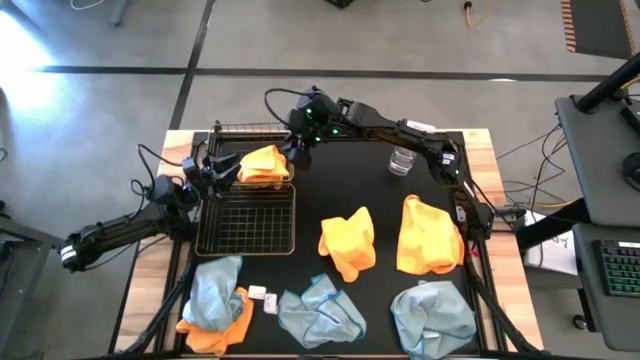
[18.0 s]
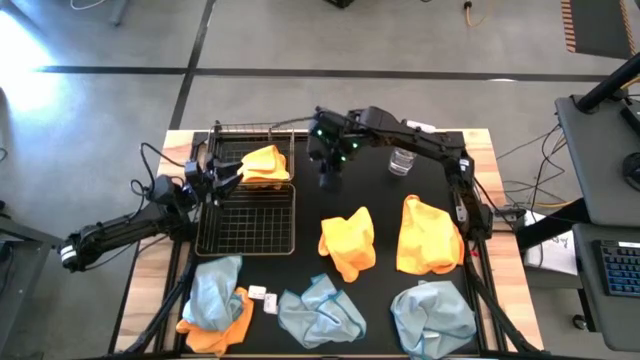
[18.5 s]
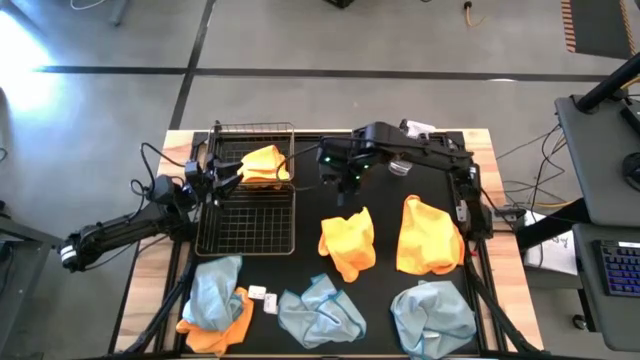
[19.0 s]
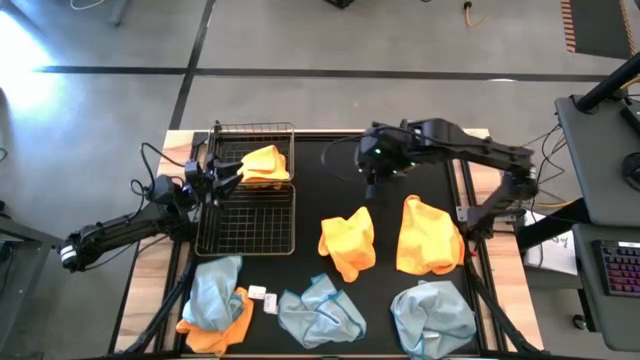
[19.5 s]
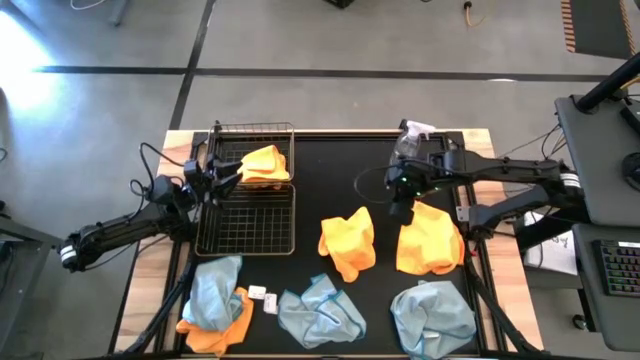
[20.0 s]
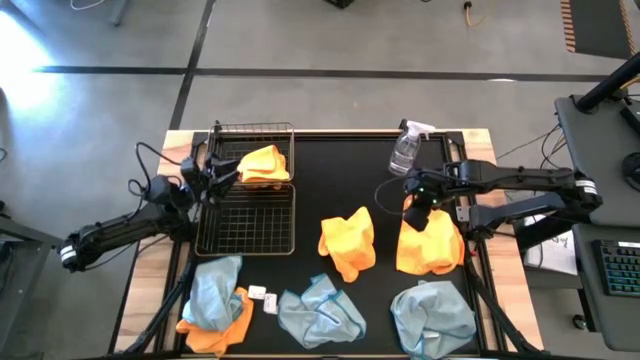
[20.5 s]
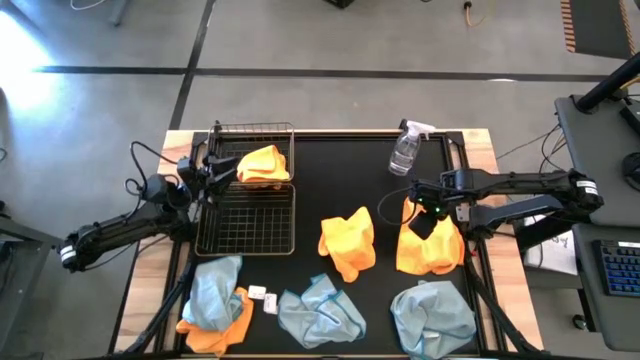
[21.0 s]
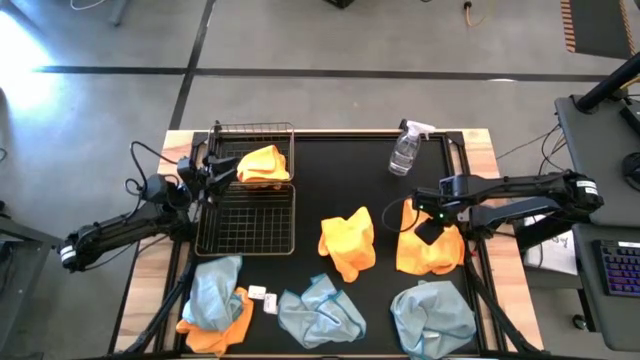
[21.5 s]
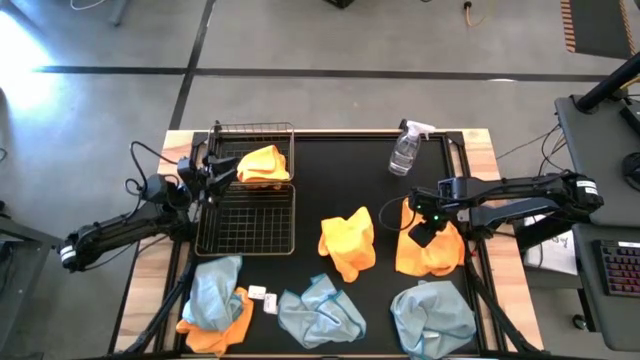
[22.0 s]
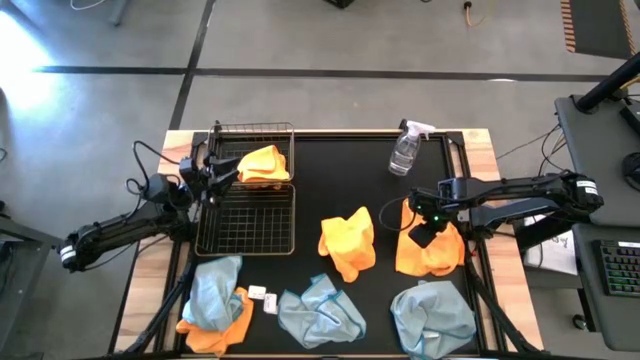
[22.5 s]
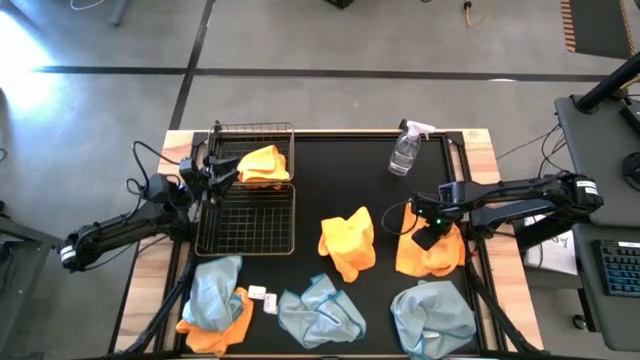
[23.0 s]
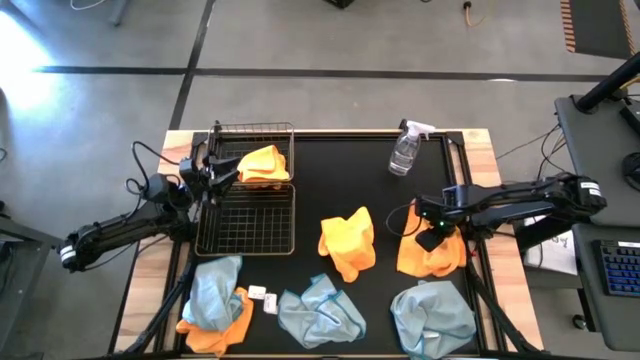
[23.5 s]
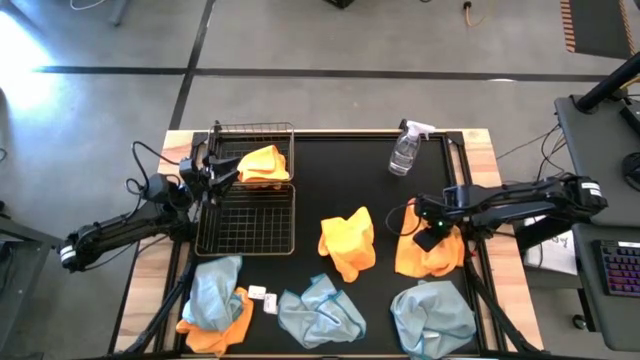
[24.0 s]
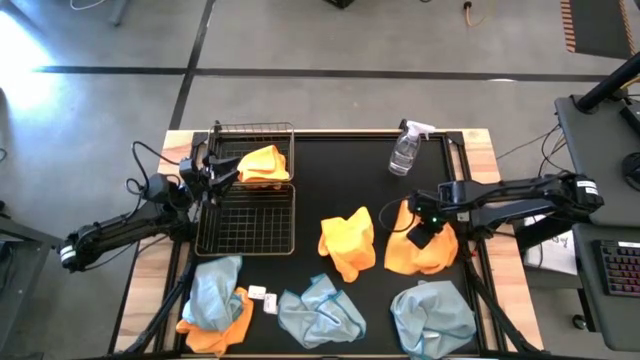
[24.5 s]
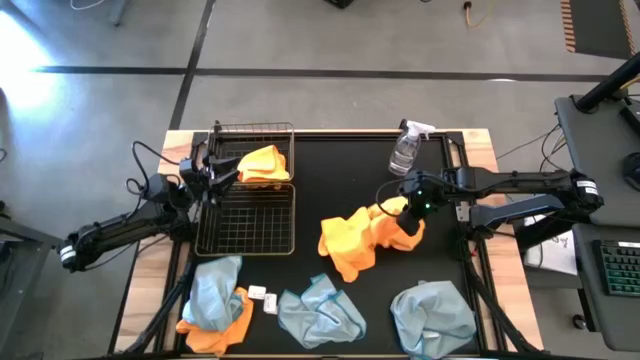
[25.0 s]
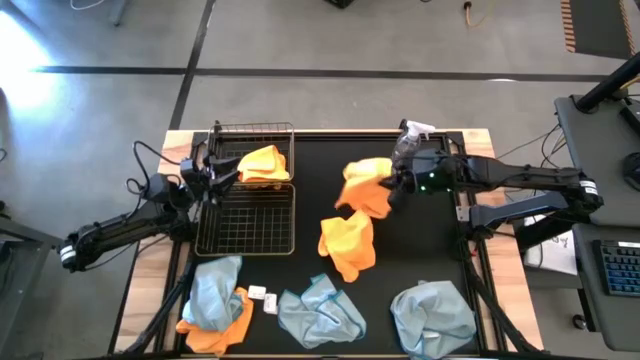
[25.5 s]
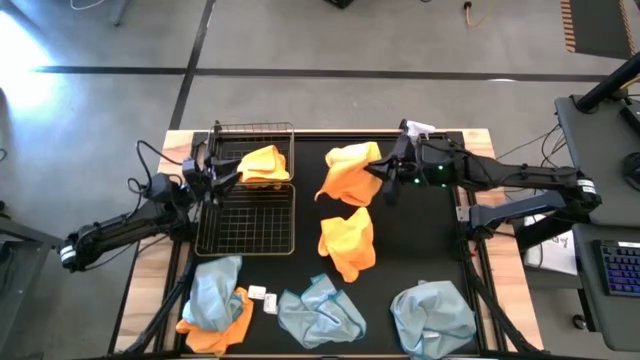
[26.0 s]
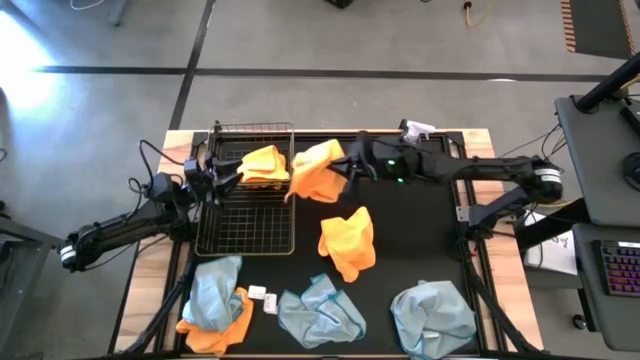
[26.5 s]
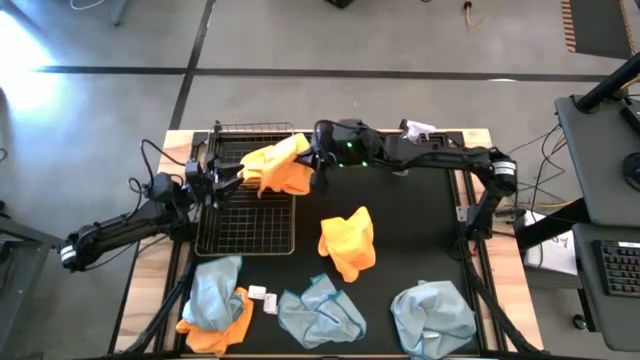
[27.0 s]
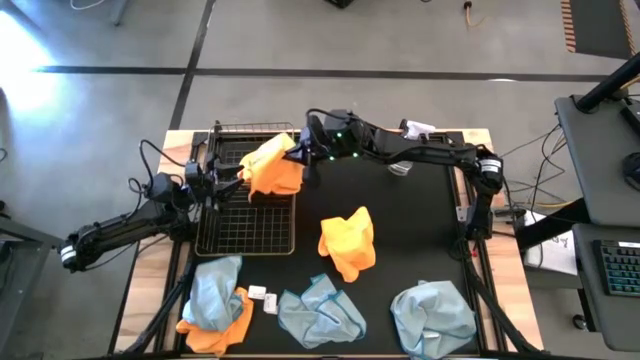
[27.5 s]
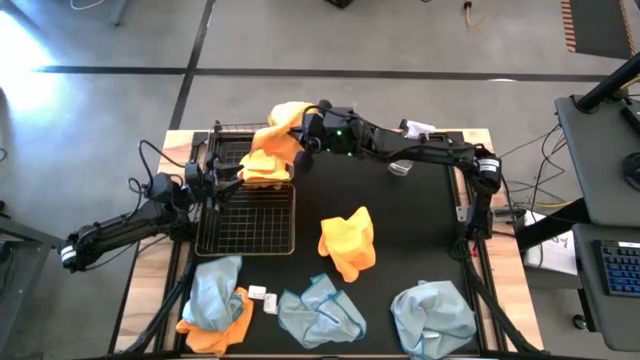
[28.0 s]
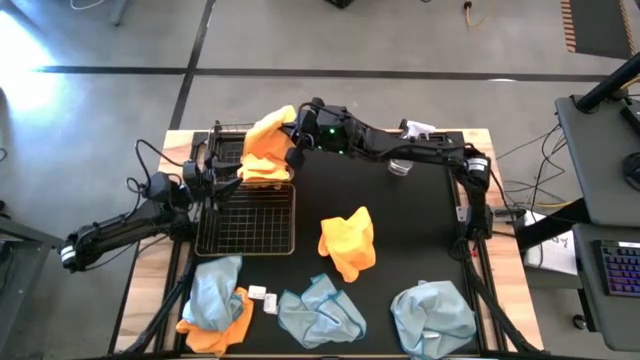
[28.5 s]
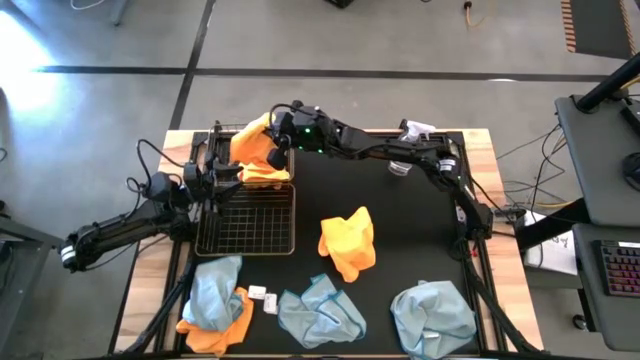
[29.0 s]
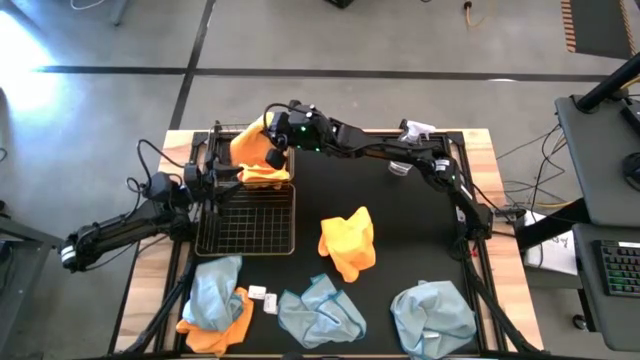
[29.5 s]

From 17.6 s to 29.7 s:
Task: Sort microfiber towel by color & place in baskets
Put the top right orange microfiber towel into the top wire basket

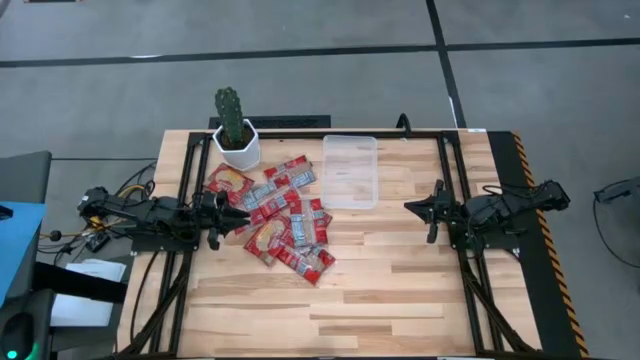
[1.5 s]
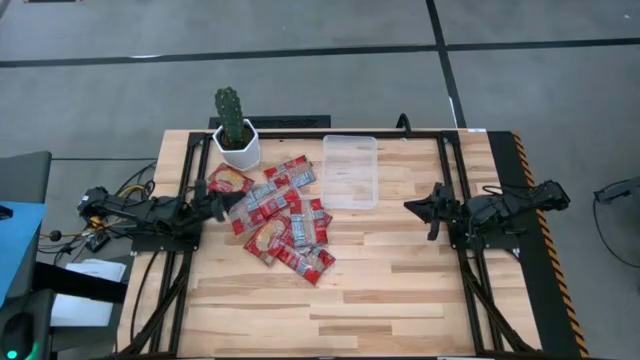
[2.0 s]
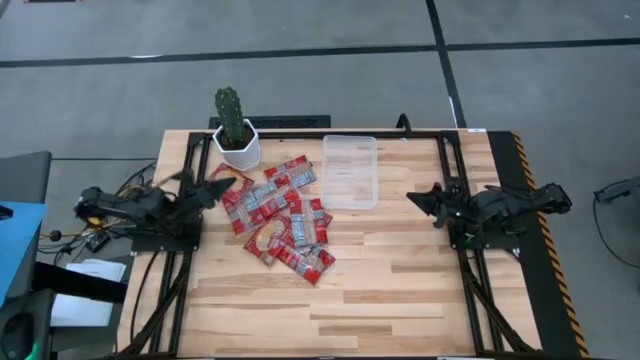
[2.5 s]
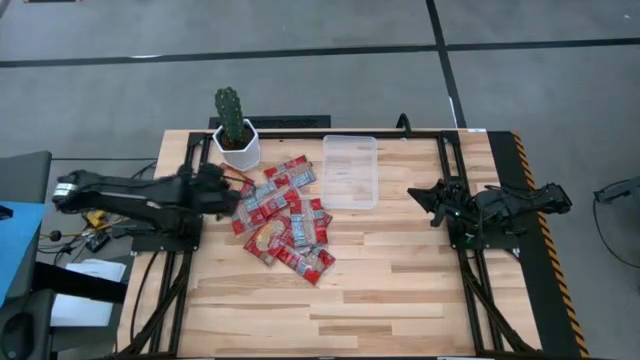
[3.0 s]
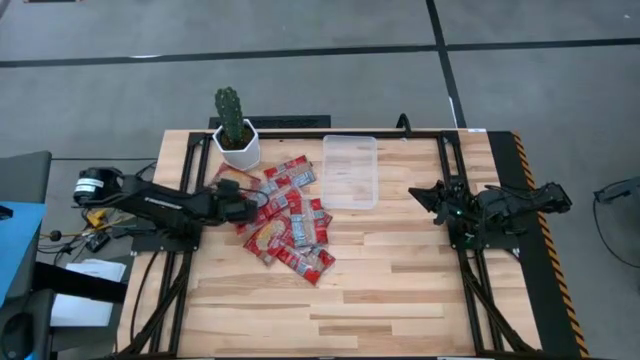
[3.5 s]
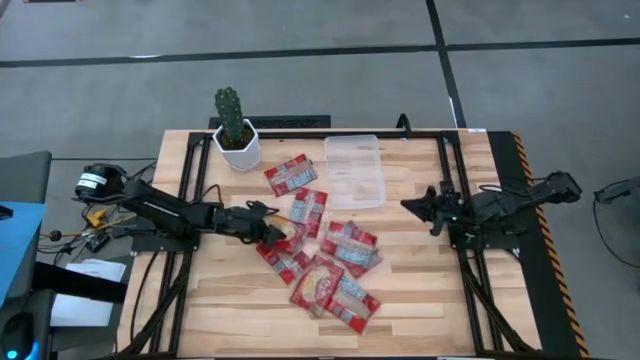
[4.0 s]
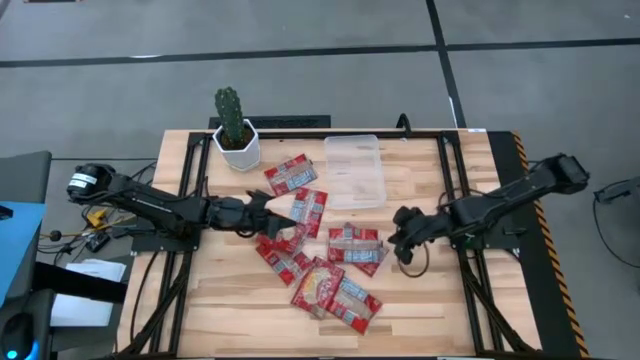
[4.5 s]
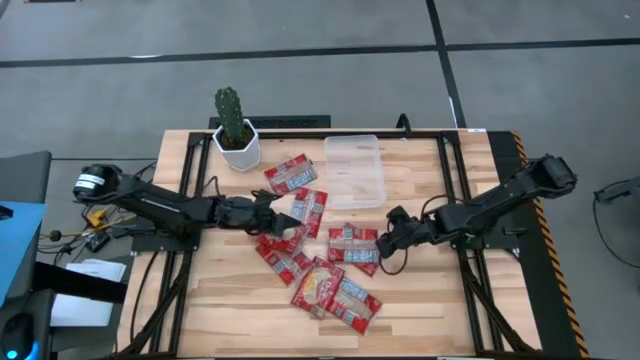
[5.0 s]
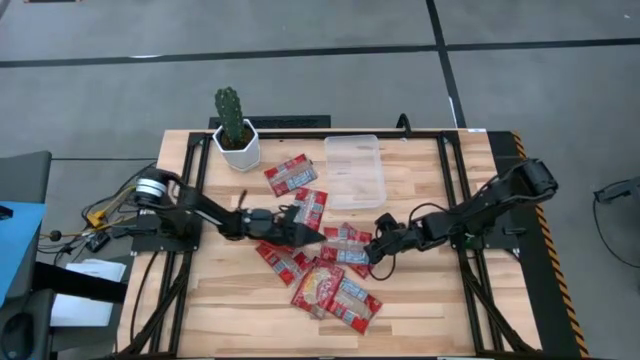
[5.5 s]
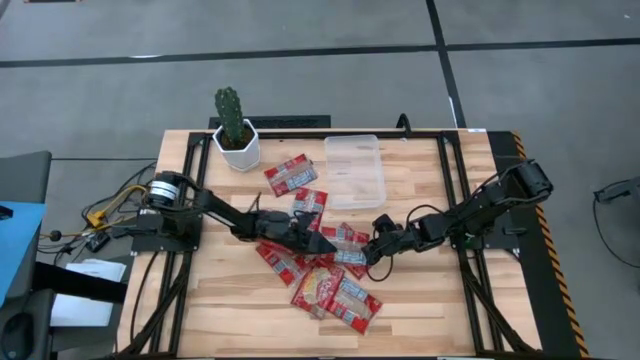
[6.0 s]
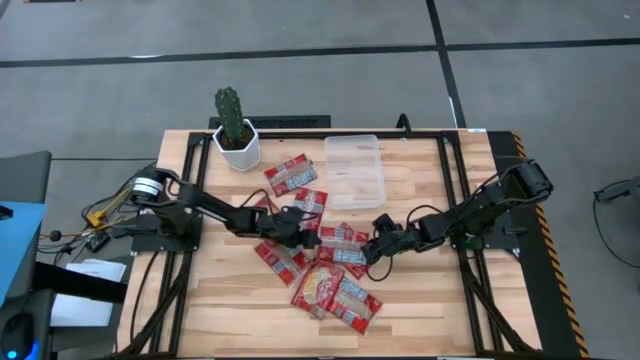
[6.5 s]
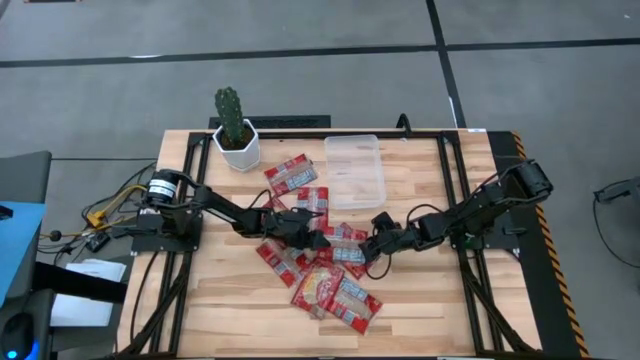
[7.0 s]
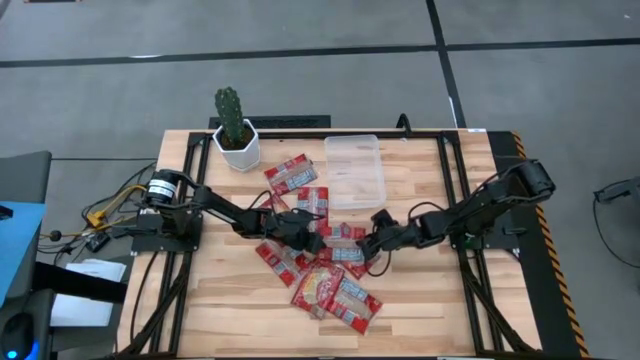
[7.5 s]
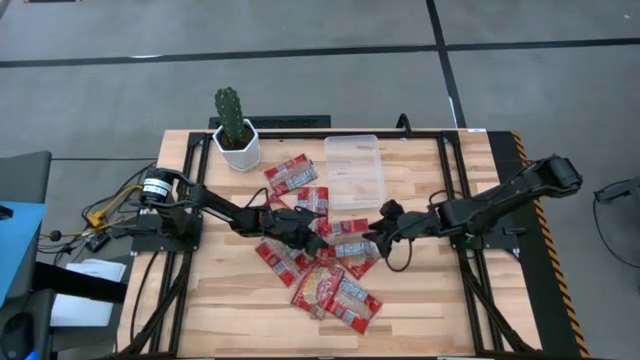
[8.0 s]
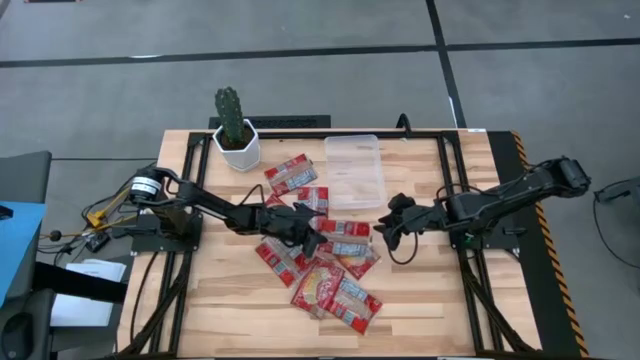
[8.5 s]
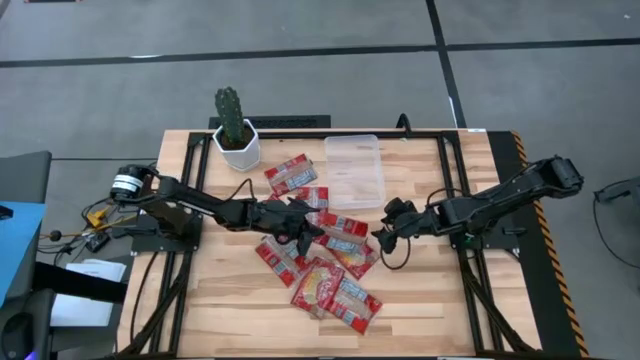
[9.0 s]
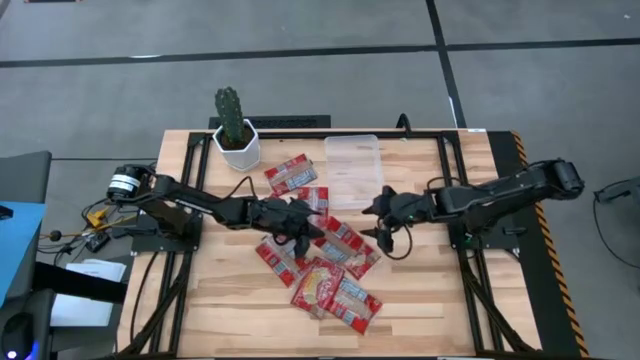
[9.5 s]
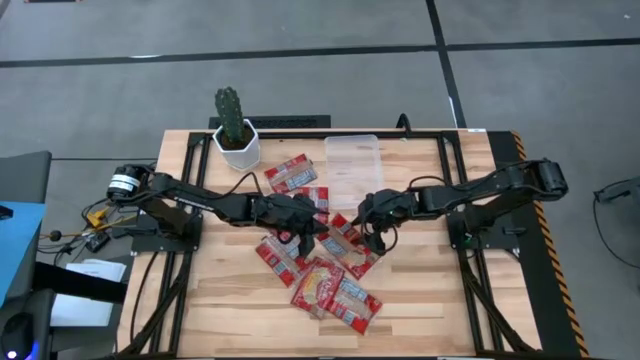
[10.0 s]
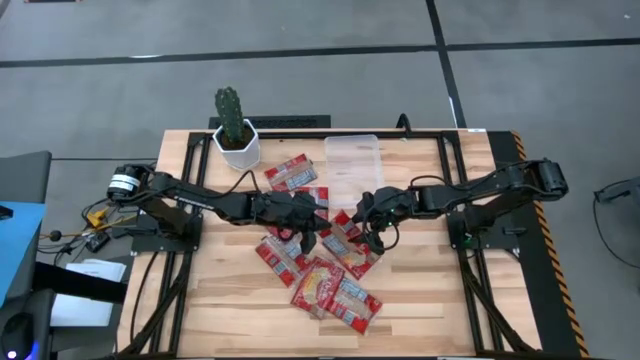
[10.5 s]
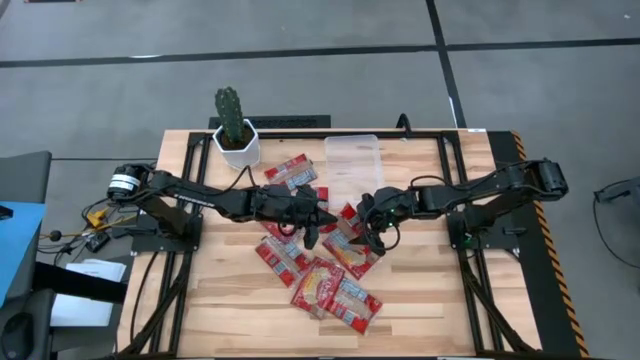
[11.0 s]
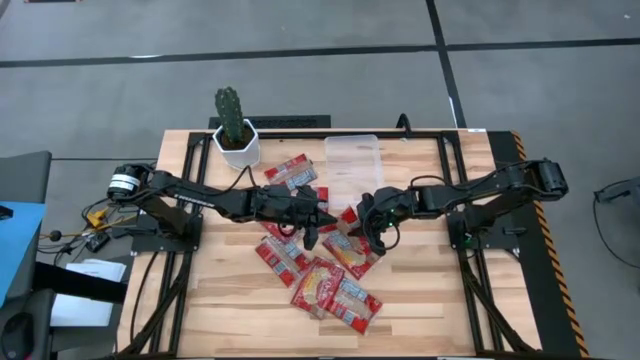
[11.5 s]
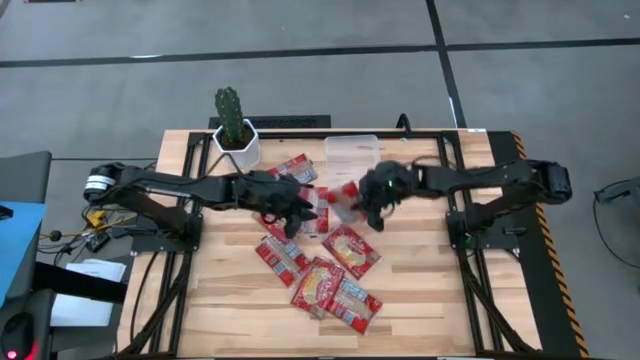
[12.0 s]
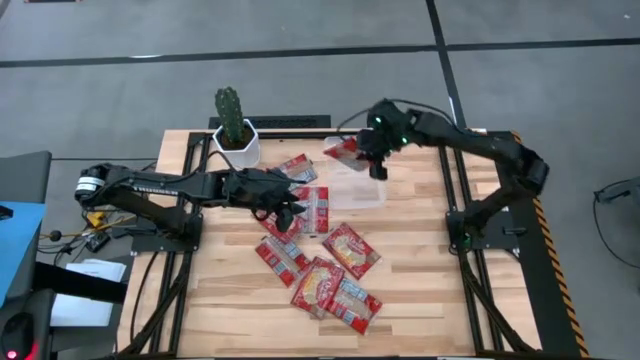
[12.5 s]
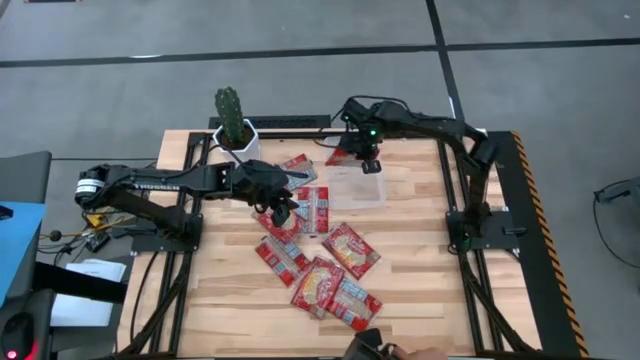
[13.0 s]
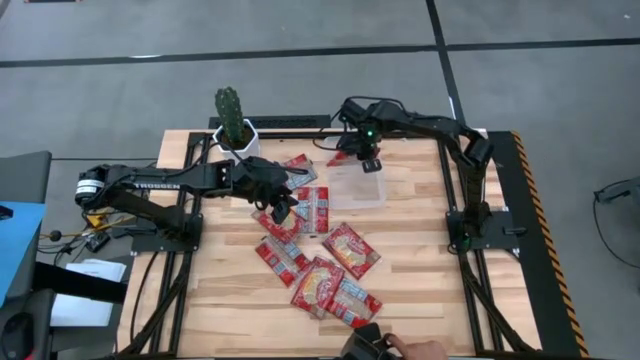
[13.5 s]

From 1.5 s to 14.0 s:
Task: Sort popcorn bags into baskets
Put the popcorn bag into the transparent bin
